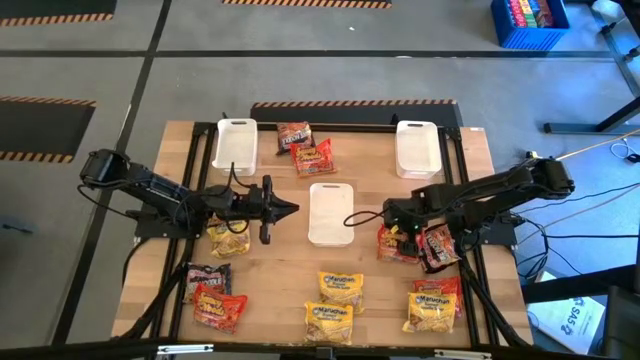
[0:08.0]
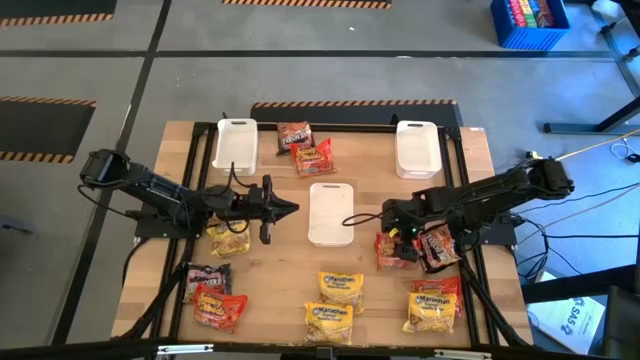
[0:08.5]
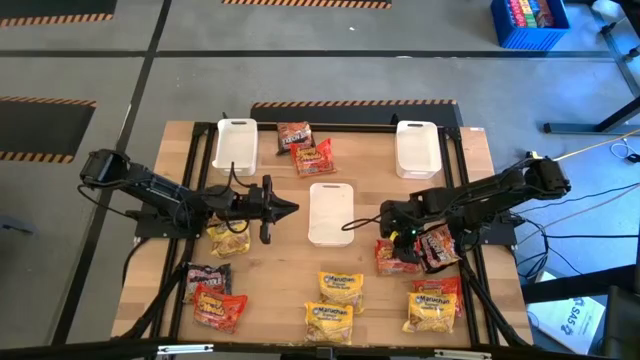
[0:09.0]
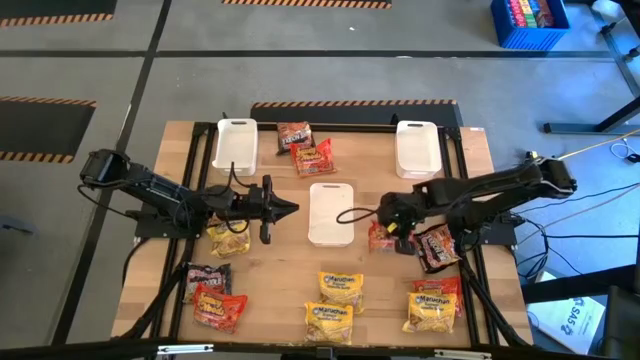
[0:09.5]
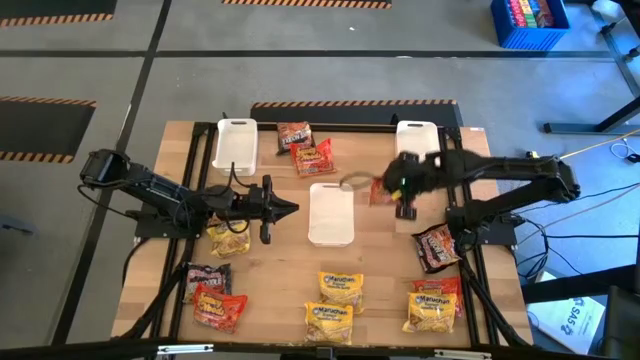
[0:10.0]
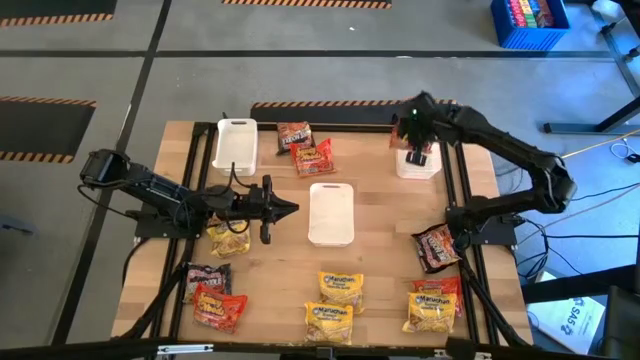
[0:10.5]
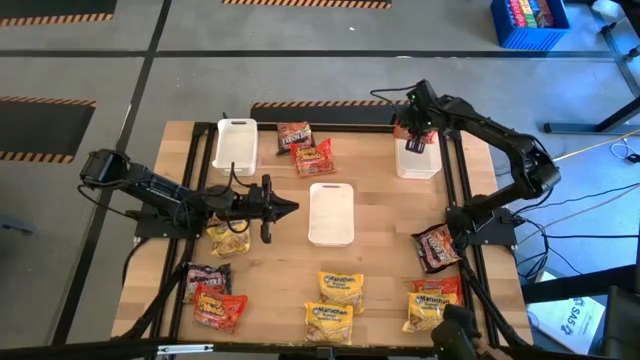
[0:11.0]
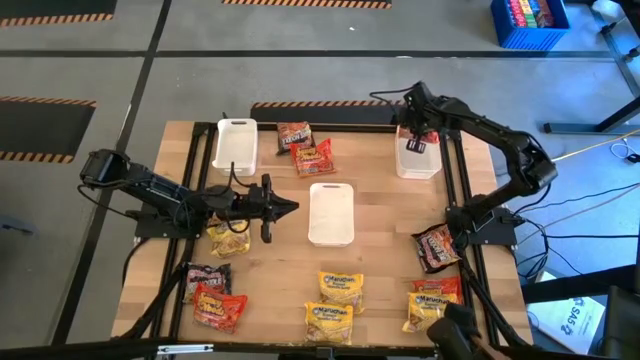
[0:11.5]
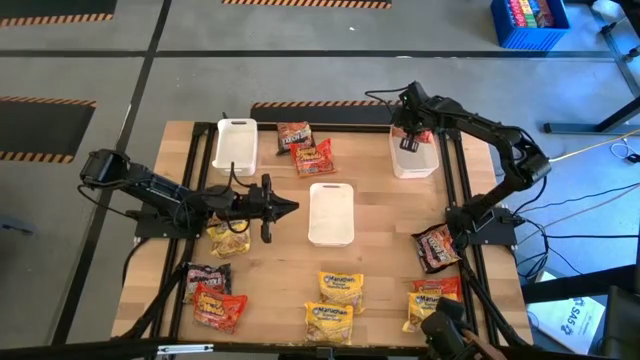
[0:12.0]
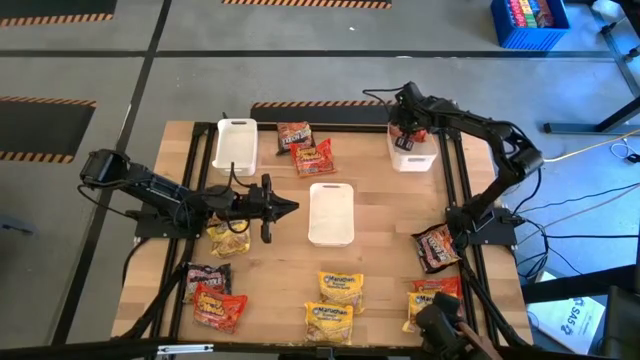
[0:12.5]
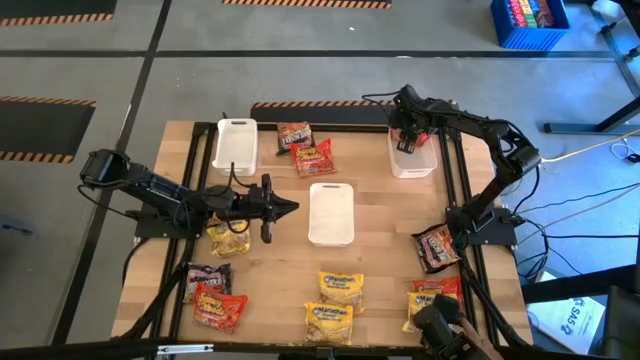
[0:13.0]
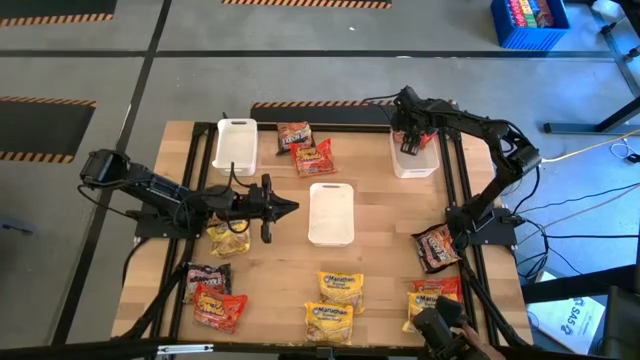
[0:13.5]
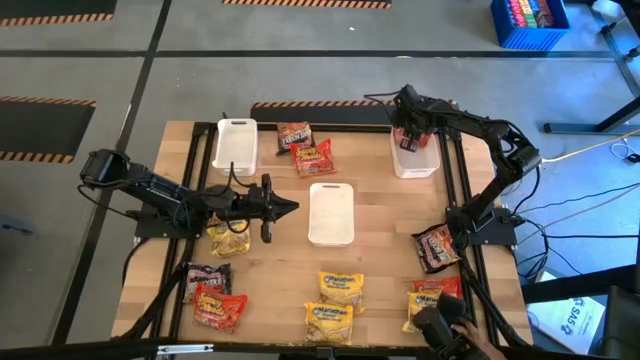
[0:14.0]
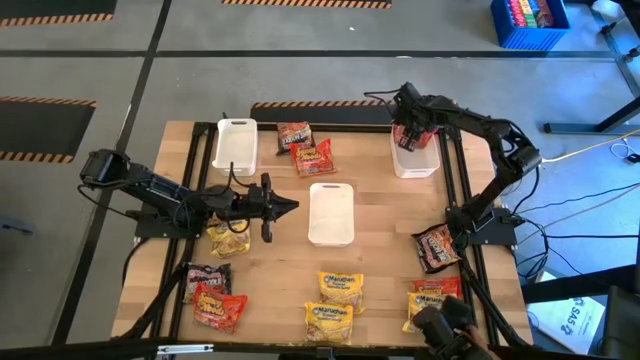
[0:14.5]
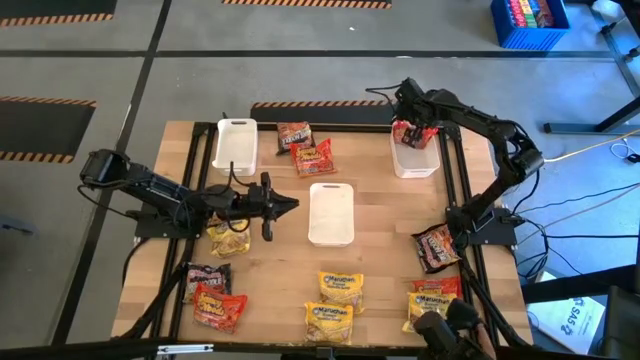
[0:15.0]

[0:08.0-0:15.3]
Task: Sort Maruchan noodles
Put the orange noodle pack into the white right bin

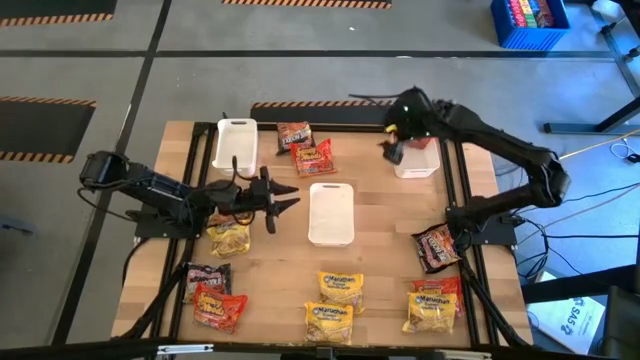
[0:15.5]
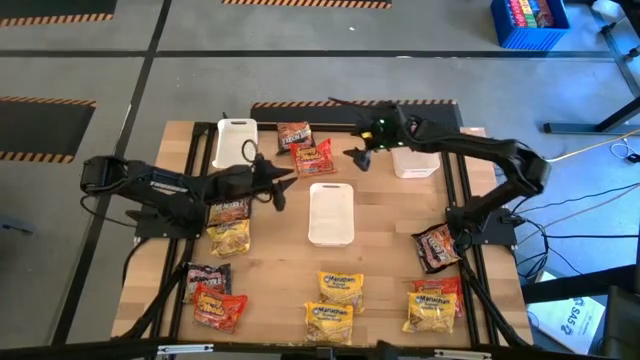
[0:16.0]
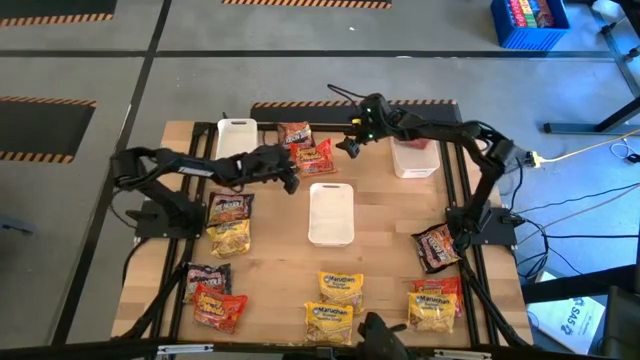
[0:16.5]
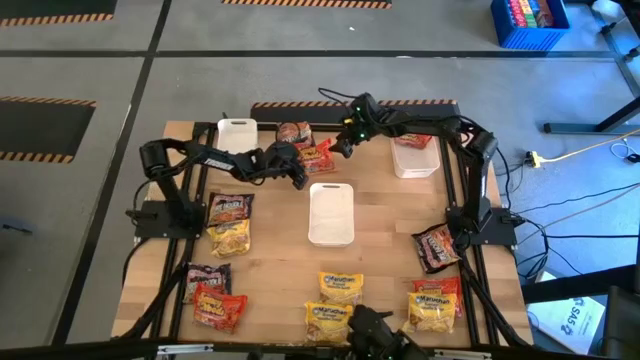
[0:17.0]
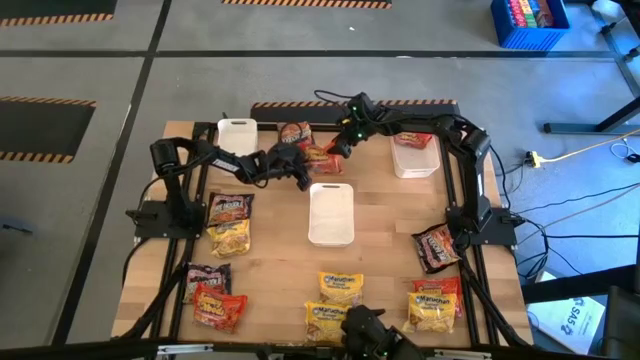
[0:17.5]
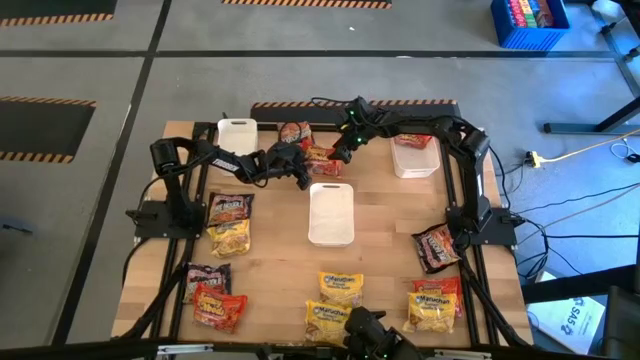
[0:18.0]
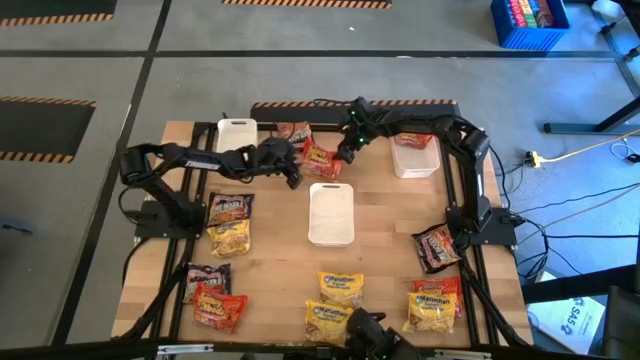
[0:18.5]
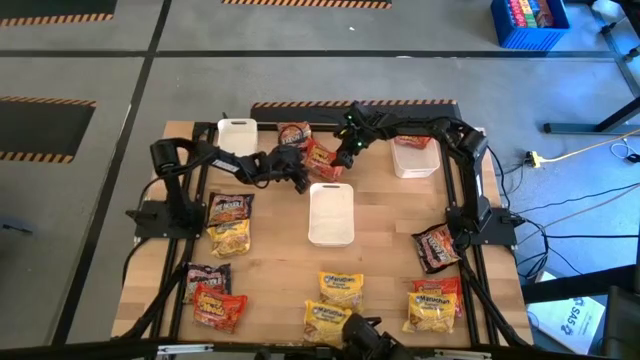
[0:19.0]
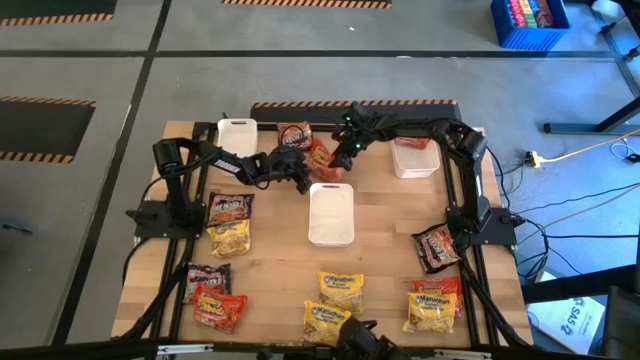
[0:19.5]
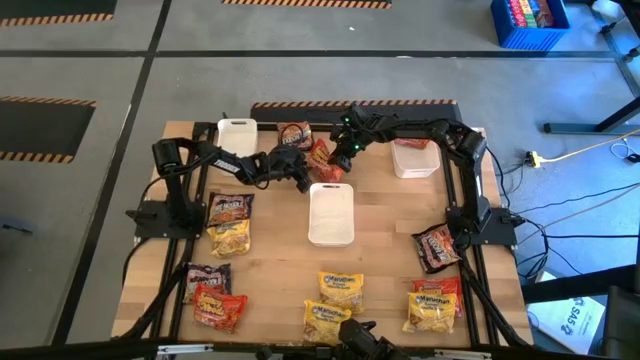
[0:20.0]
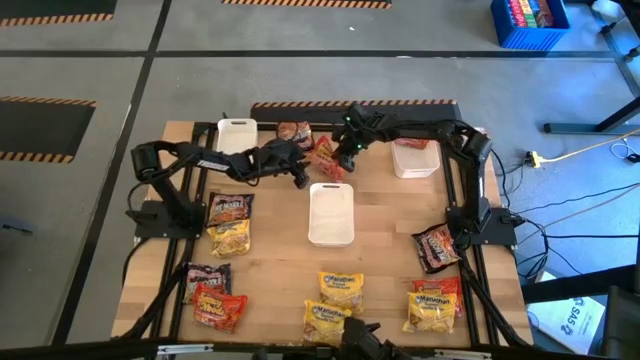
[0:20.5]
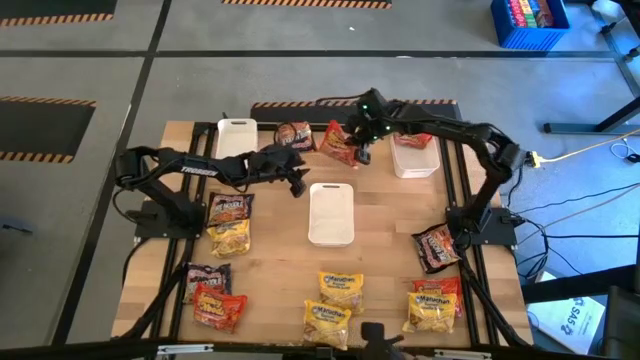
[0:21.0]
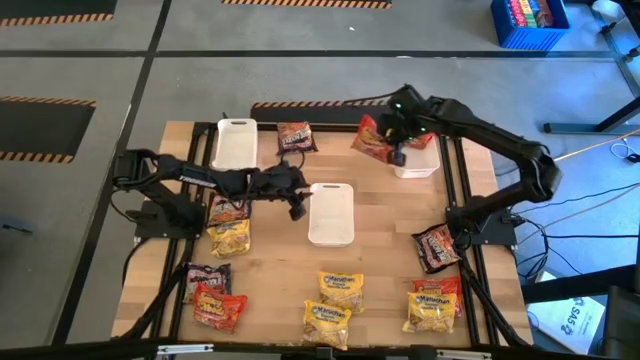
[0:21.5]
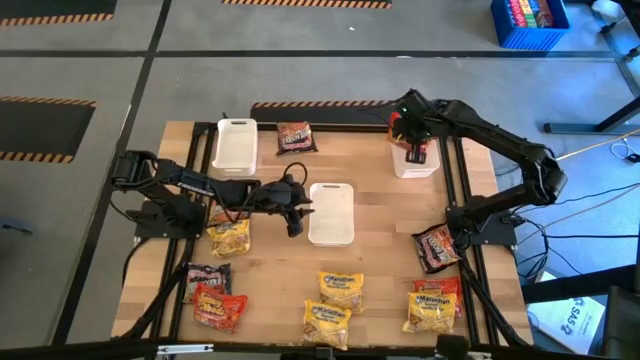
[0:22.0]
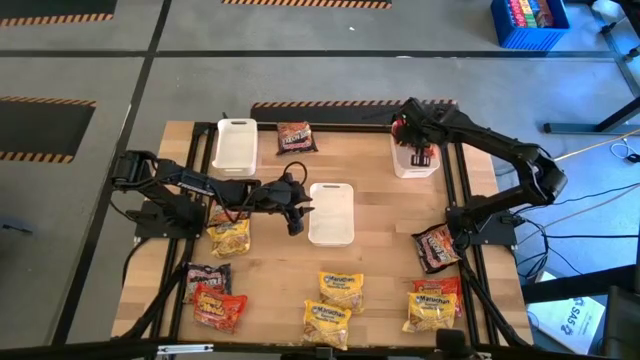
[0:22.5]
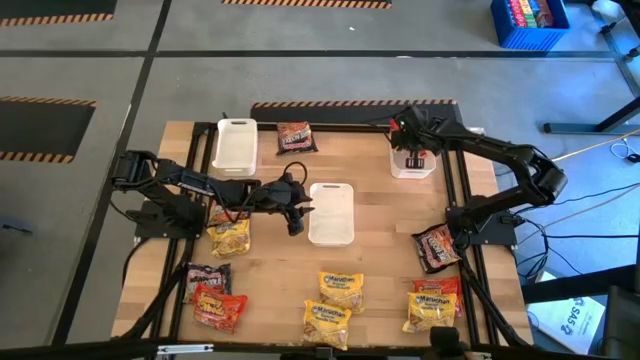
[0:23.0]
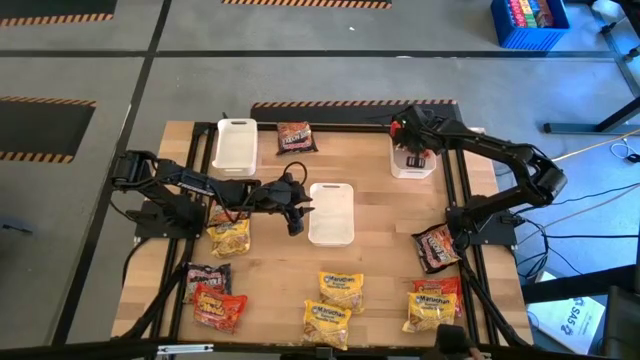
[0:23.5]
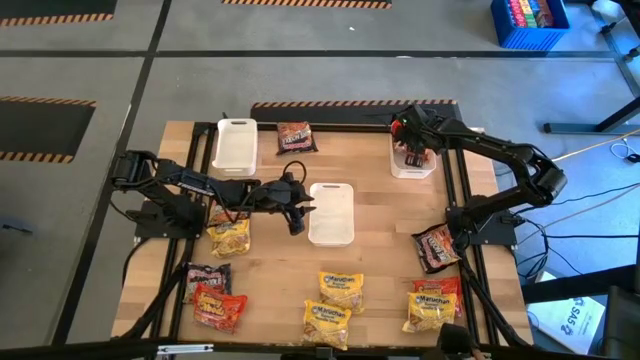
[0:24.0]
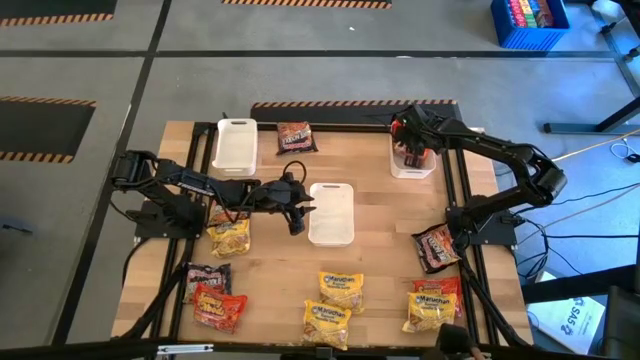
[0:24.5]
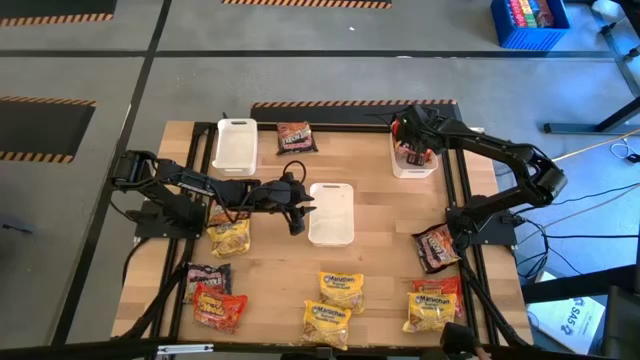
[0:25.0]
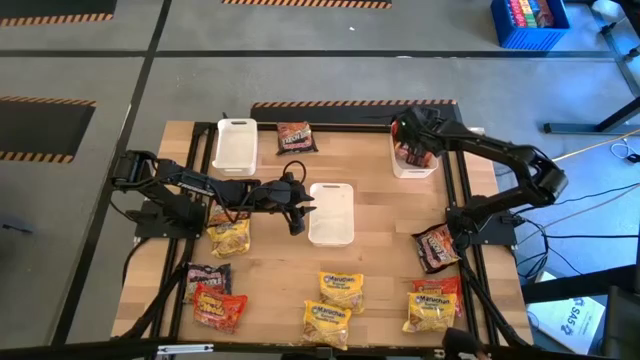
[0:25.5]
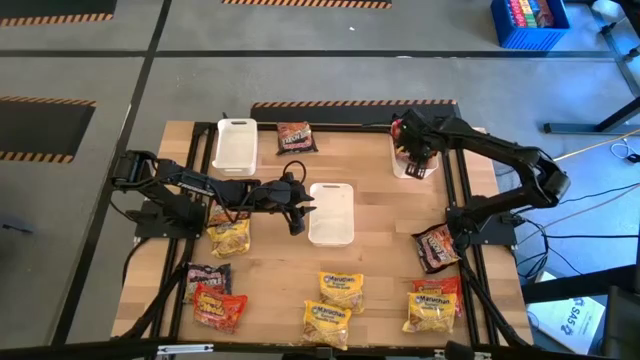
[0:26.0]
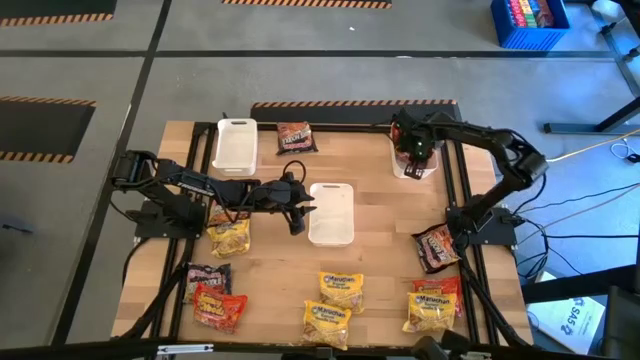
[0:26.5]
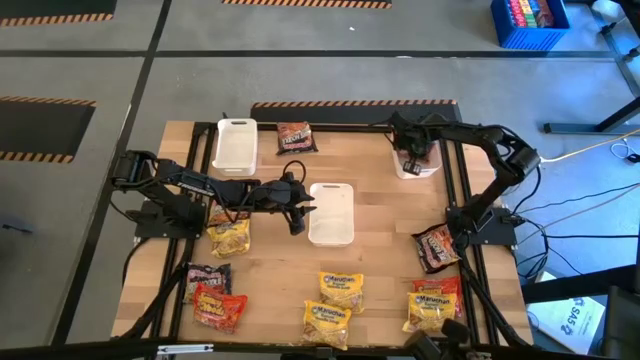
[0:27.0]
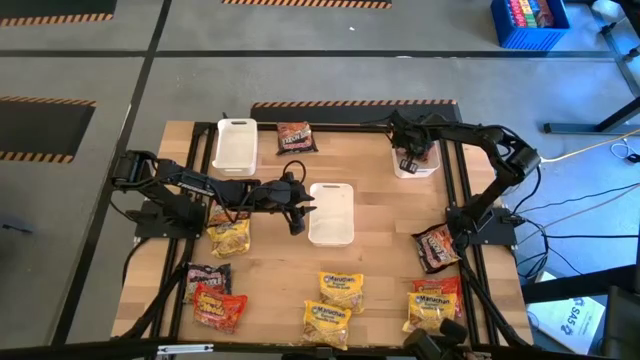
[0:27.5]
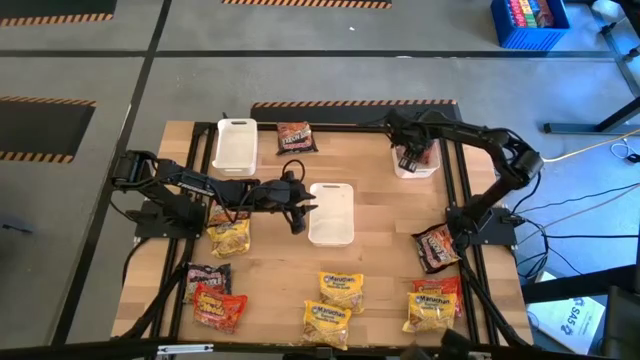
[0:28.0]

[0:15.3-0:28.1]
Put the orange noodle pack into the white right bin
